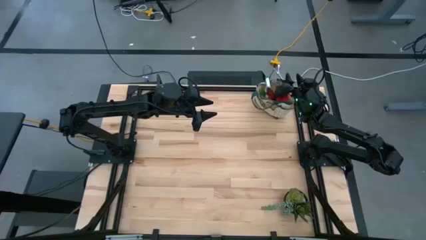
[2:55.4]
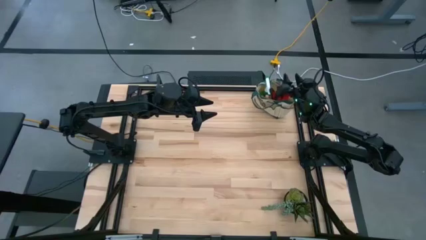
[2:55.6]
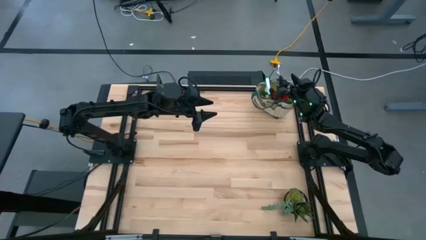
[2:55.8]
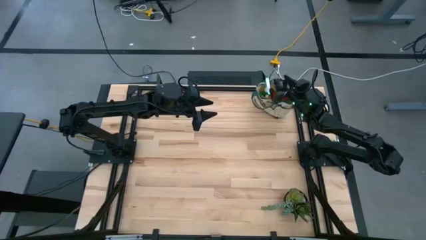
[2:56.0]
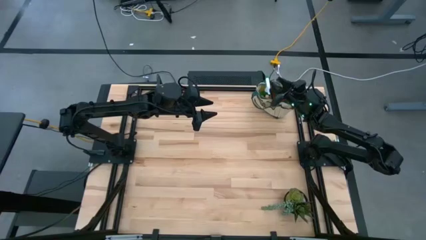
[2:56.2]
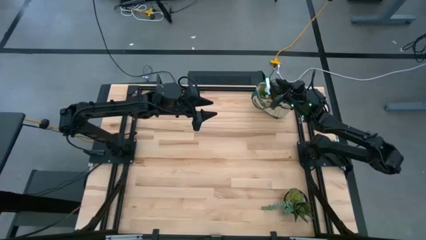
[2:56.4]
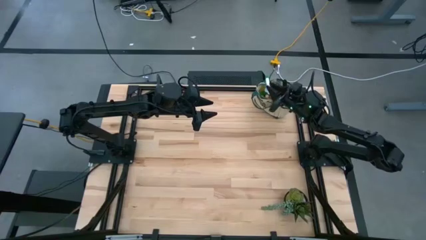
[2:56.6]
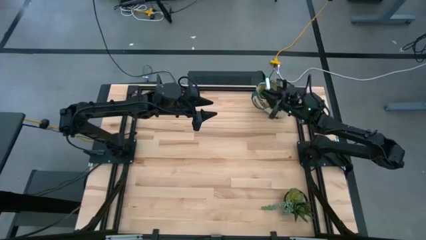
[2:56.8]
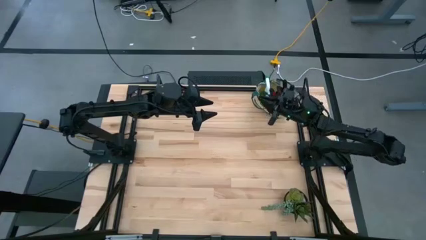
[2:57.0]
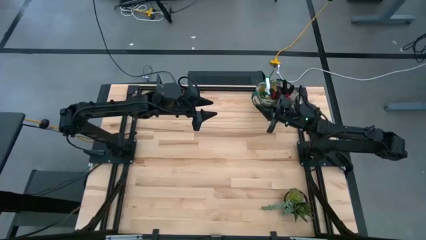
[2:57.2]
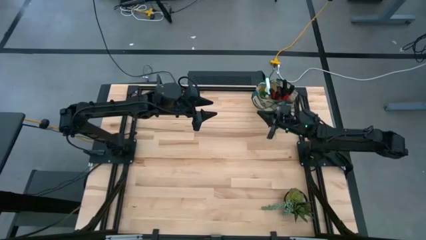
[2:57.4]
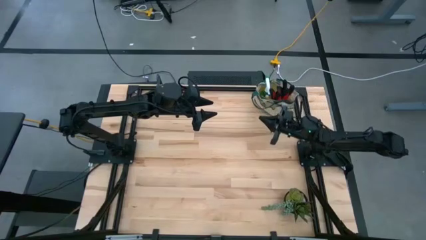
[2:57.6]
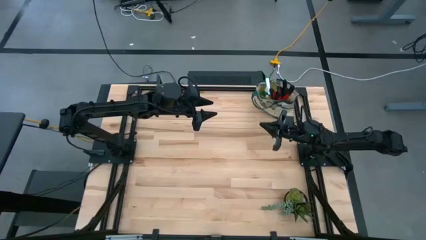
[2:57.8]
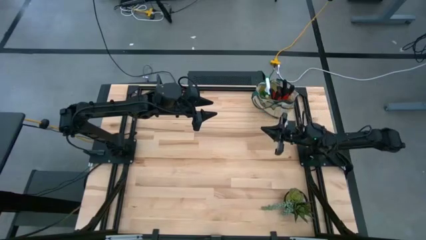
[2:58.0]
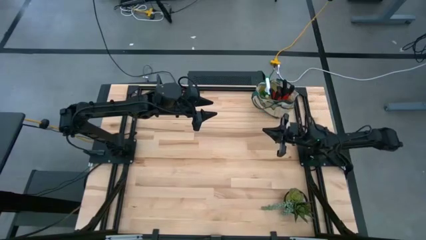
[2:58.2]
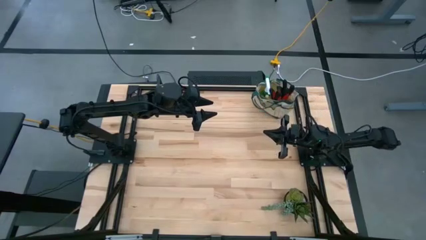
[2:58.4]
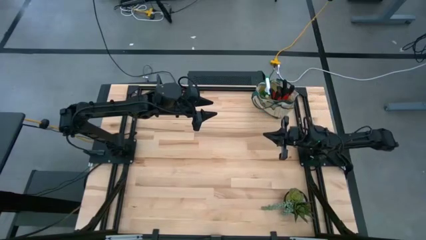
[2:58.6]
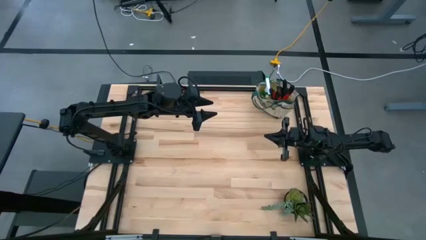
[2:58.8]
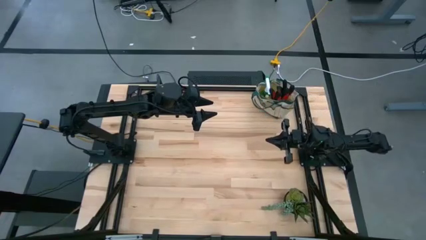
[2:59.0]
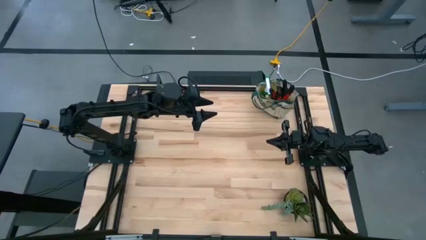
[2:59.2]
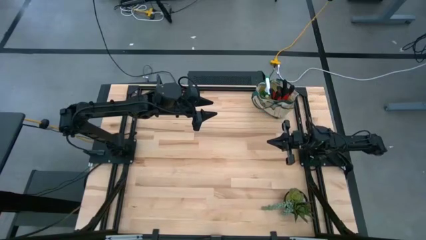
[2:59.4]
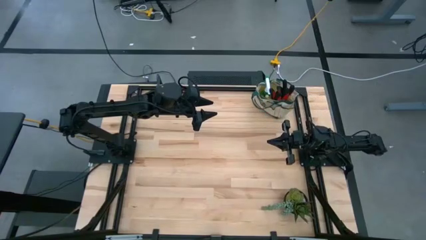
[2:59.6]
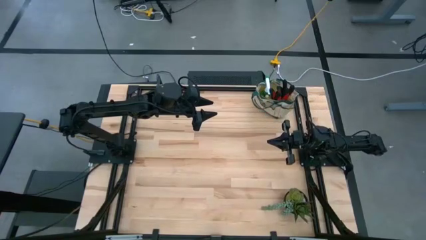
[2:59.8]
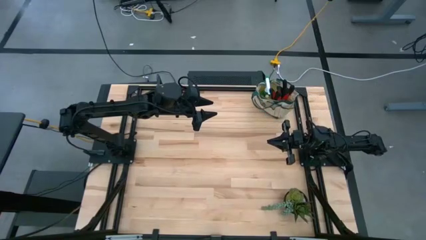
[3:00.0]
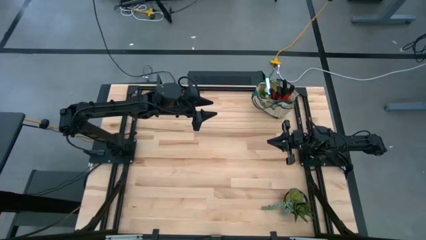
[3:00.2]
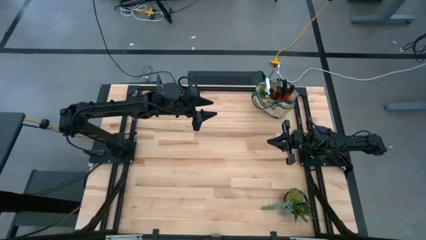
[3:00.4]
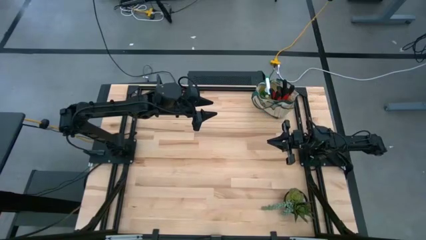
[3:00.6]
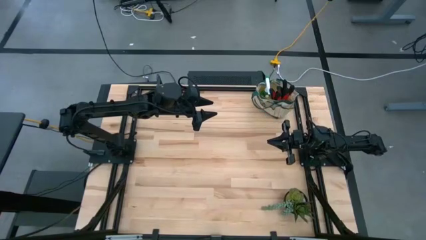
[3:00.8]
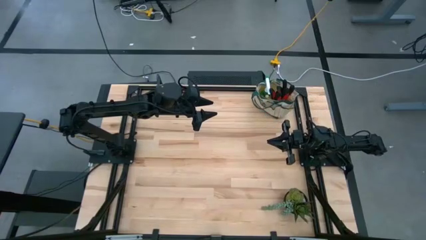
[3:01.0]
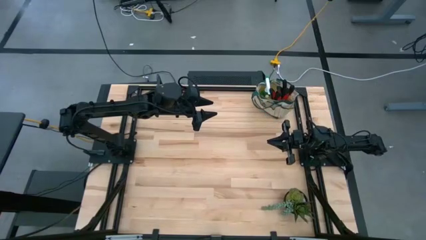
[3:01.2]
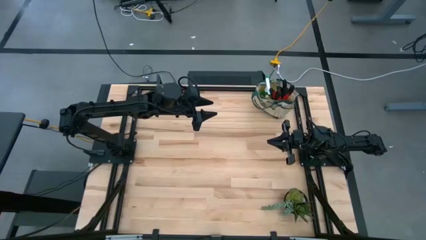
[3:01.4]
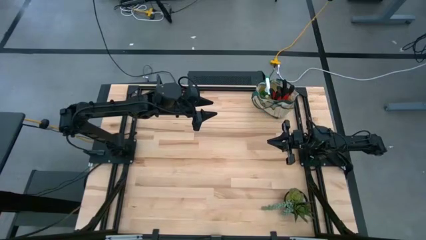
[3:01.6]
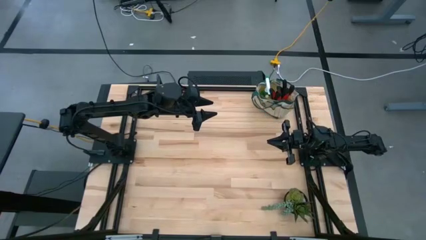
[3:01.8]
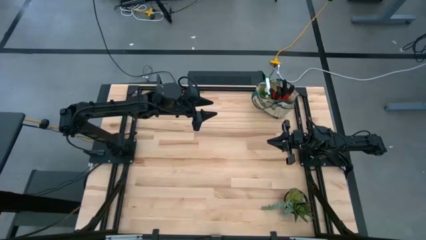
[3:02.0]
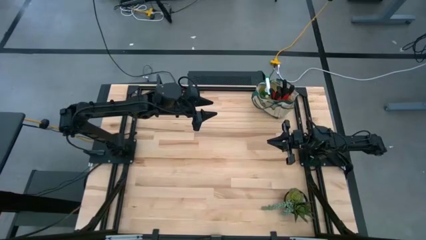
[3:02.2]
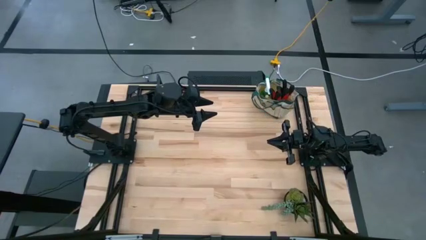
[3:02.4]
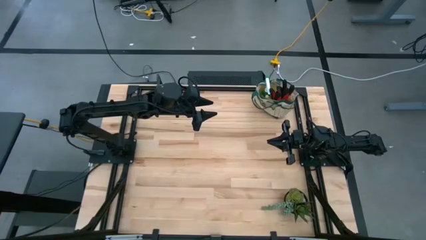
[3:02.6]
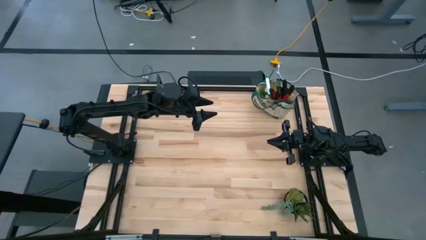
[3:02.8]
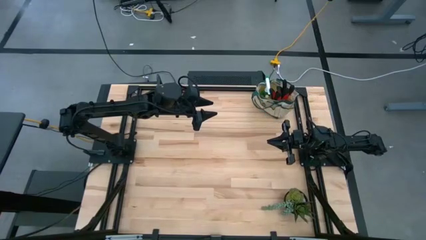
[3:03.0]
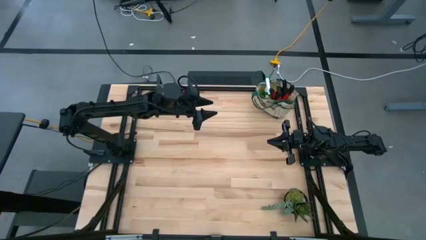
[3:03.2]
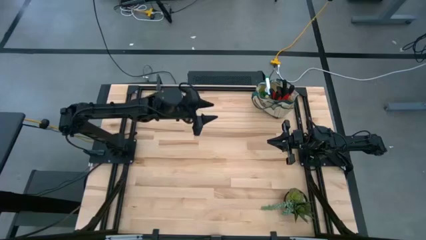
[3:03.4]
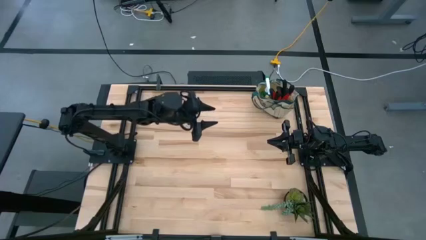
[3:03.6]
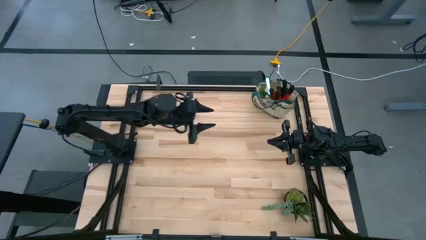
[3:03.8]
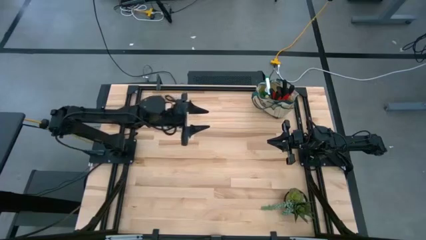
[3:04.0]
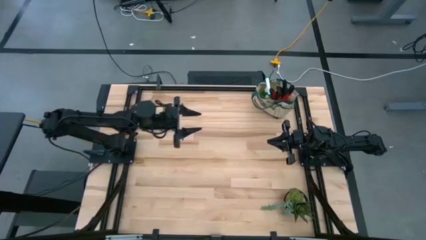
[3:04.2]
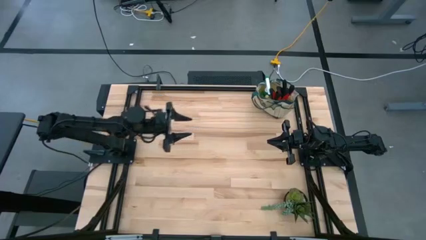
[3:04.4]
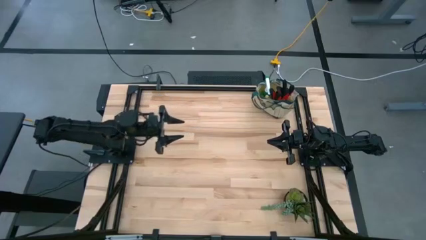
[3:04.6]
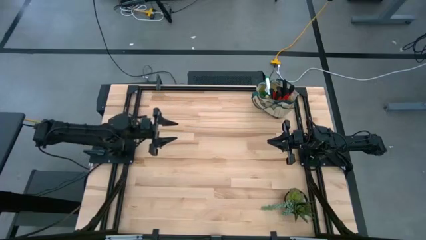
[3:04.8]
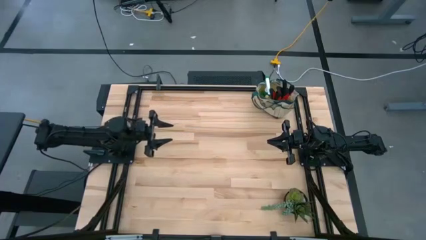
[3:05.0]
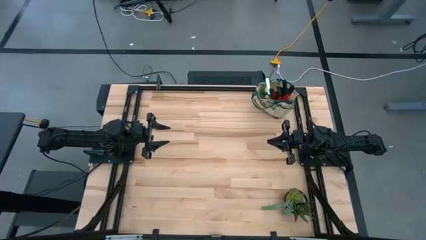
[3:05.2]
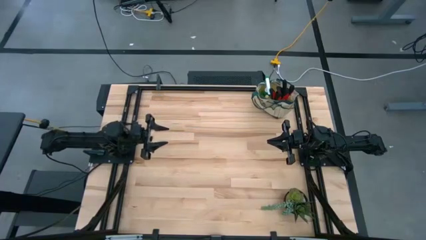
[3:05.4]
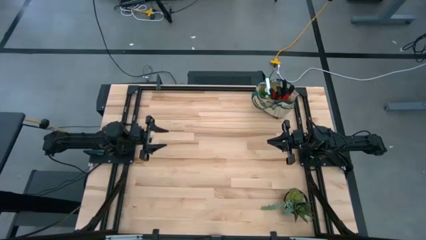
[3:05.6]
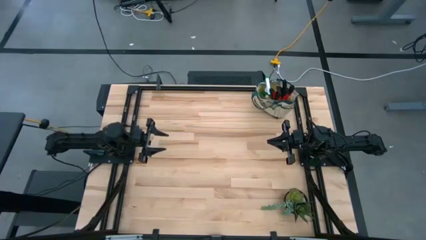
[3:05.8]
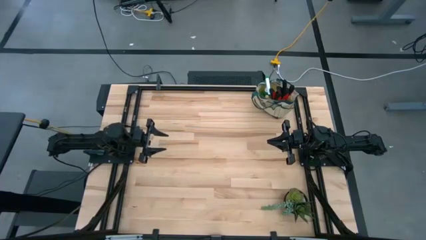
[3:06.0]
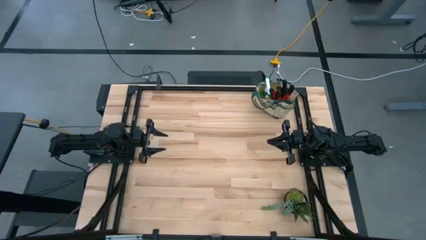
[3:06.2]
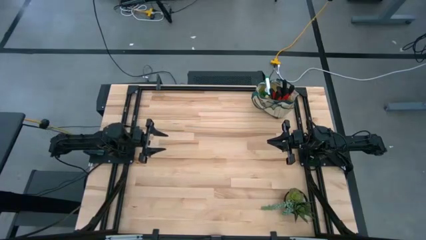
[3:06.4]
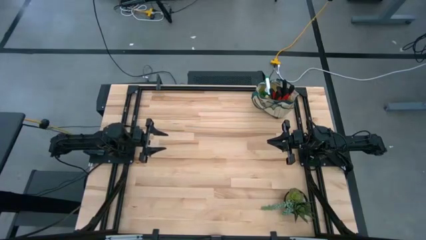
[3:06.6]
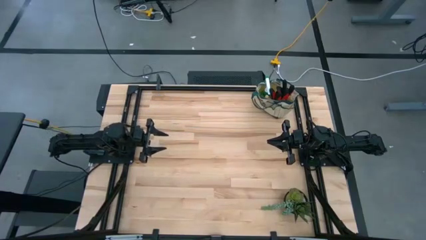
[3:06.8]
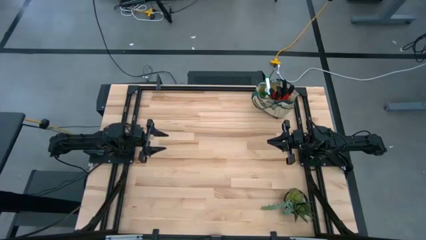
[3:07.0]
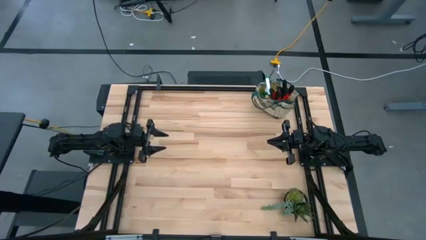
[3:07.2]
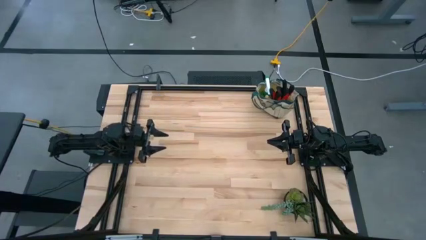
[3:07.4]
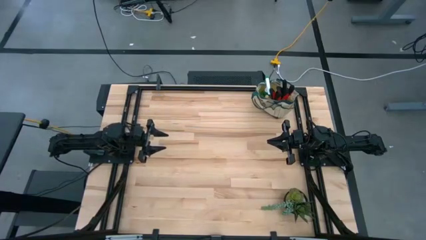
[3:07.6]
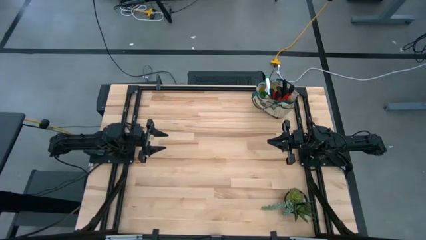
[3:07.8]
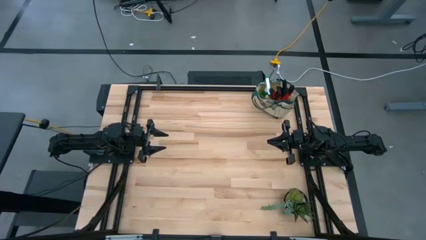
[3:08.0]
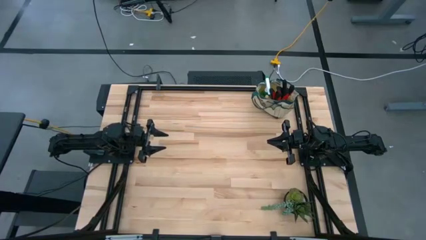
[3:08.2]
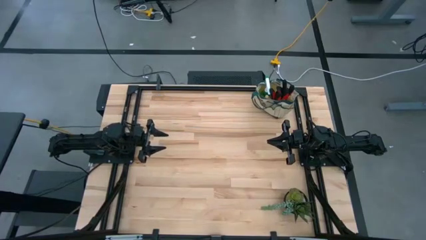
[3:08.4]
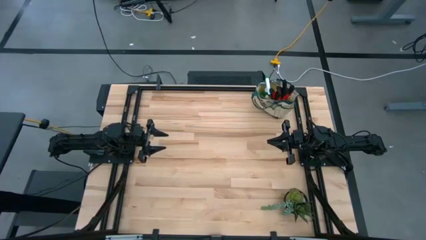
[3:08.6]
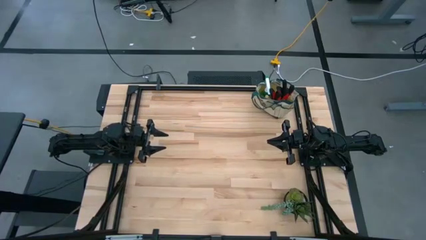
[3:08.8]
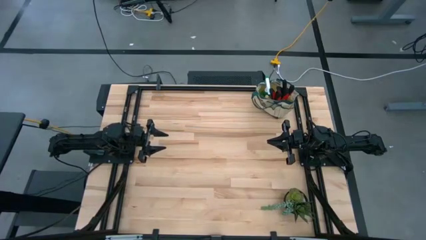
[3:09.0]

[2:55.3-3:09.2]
Task: Pick & Place Garden tools in Gardening bag
Return to Home Position

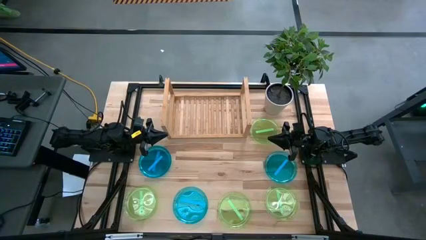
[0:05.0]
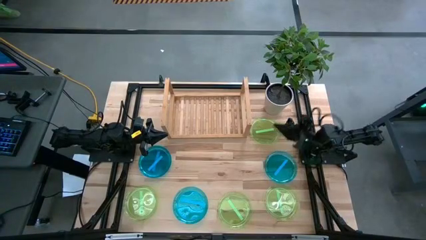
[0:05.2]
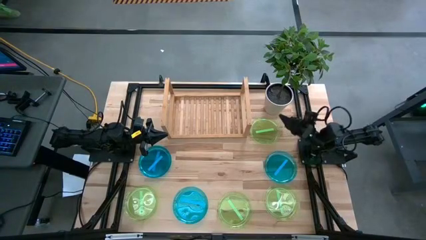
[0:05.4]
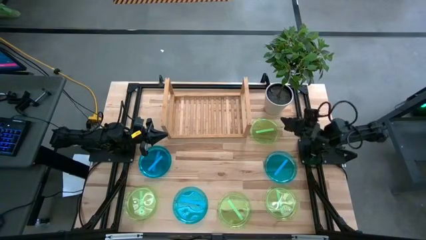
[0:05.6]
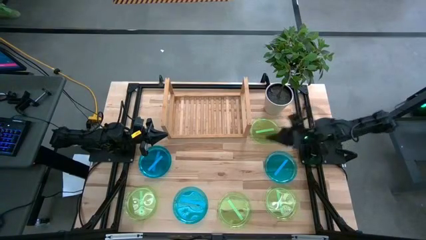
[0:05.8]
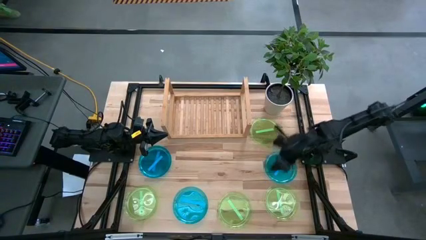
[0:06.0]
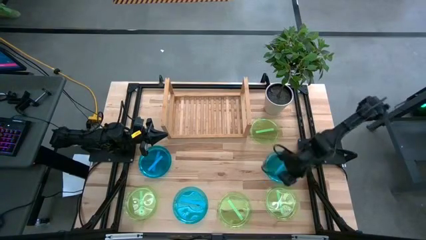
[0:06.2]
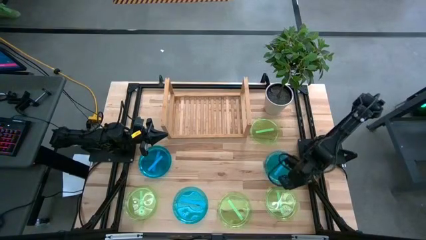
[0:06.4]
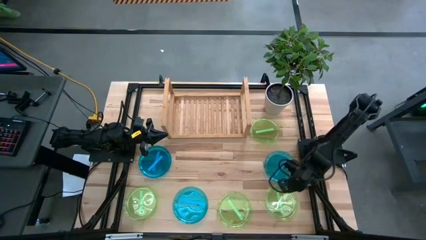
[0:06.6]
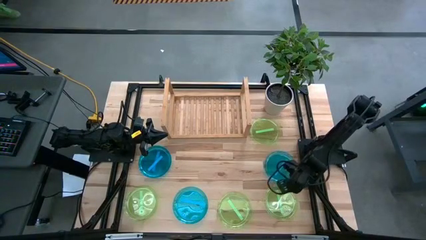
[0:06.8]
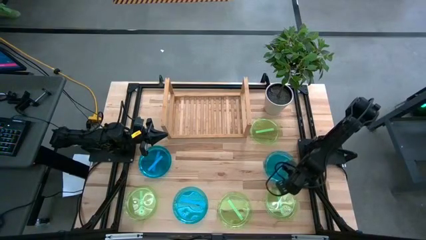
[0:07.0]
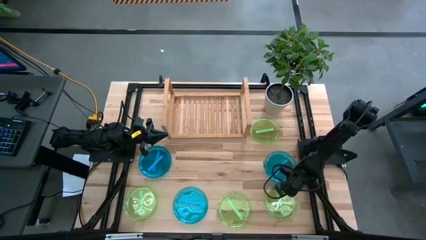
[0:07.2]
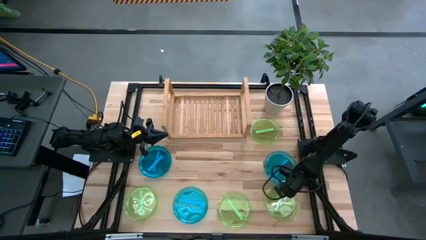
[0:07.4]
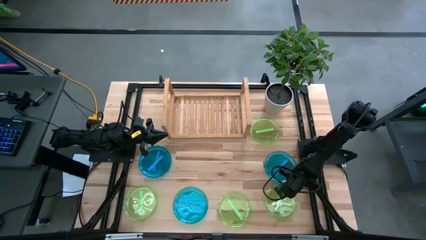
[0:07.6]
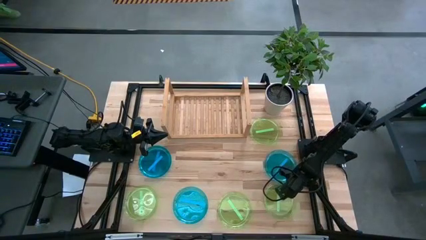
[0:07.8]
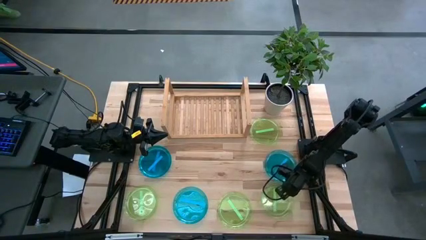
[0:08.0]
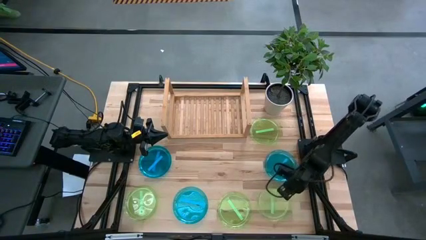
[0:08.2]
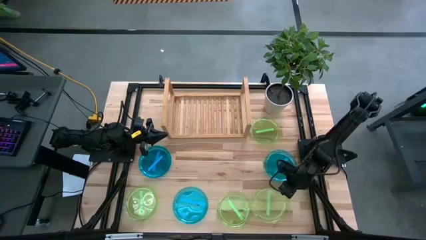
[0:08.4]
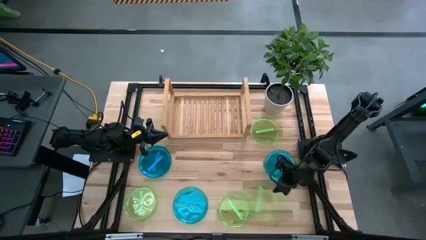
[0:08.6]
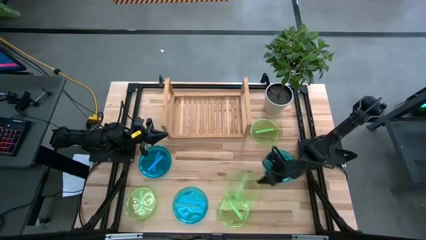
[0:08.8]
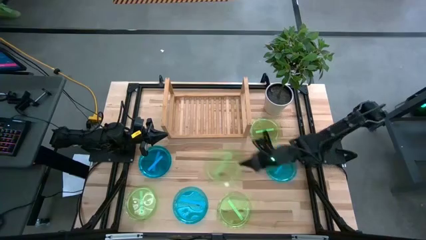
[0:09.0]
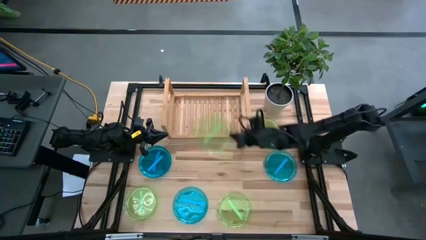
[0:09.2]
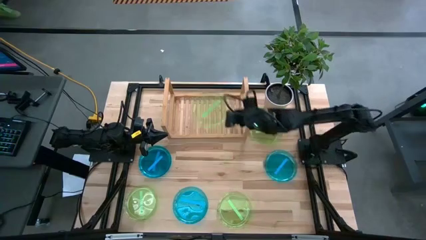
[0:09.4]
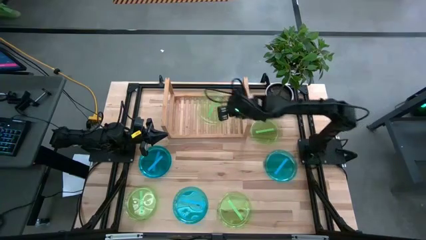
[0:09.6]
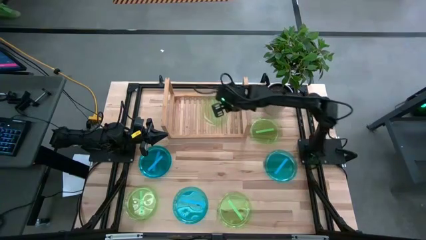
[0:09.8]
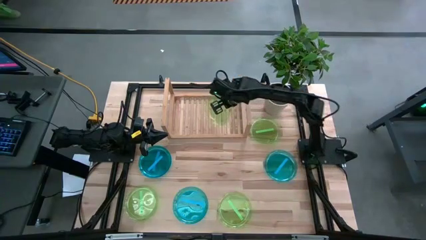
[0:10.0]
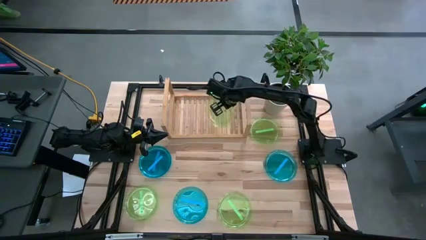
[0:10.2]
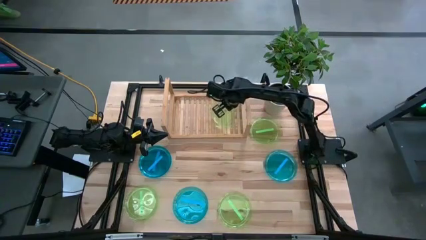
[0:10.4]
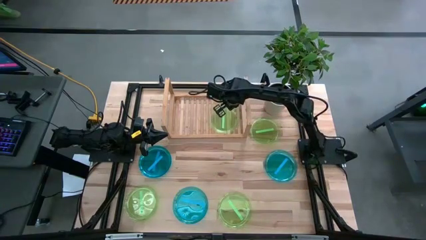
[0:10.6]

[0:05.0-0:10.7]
Task: Place and stack plates onto a shelf
Put the bottom right transparent green plate on the shelf
